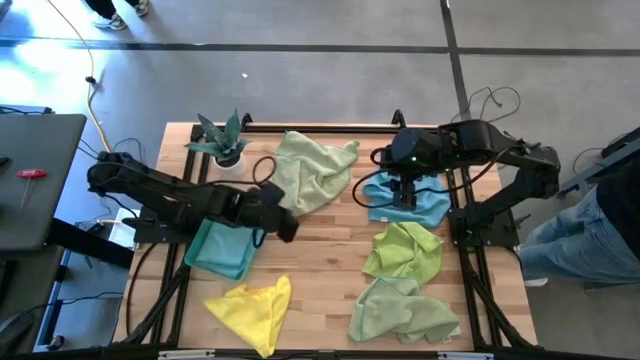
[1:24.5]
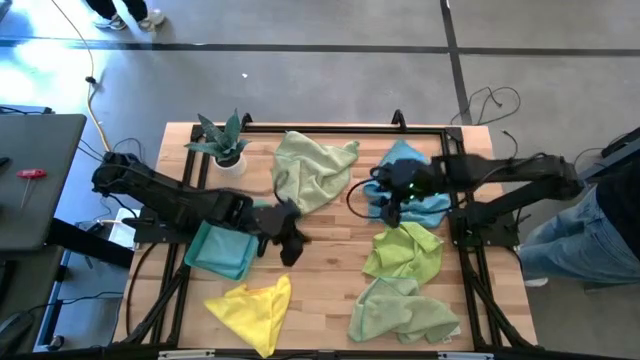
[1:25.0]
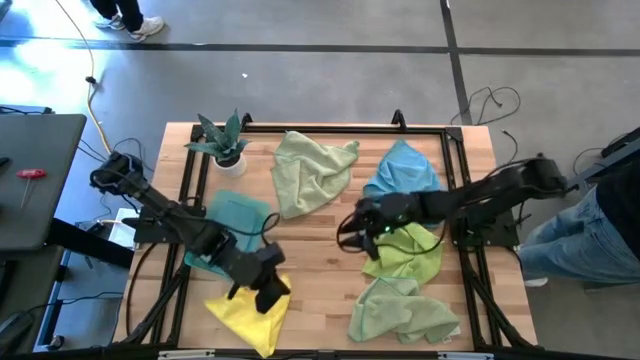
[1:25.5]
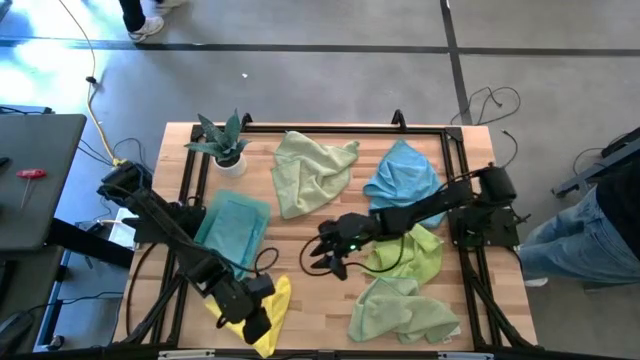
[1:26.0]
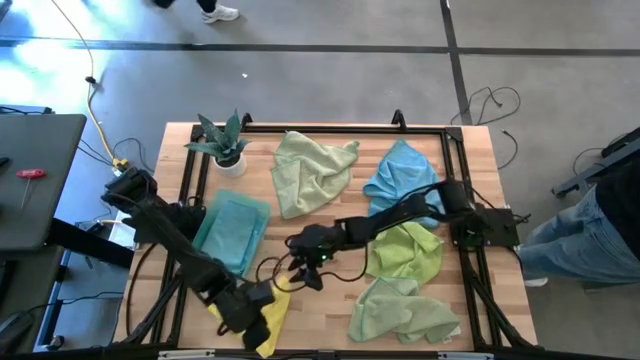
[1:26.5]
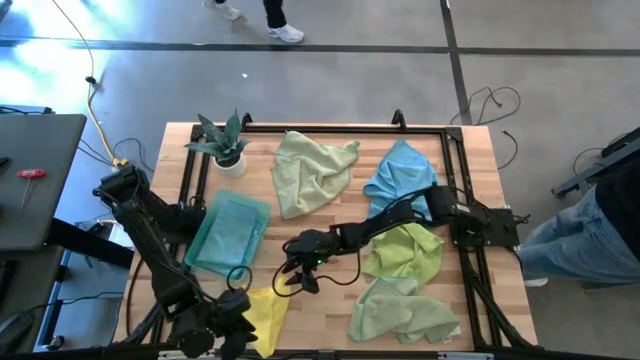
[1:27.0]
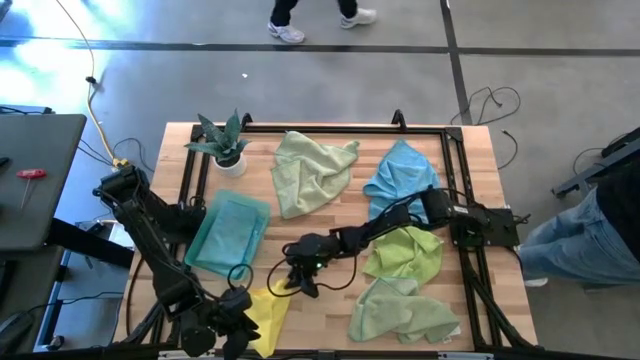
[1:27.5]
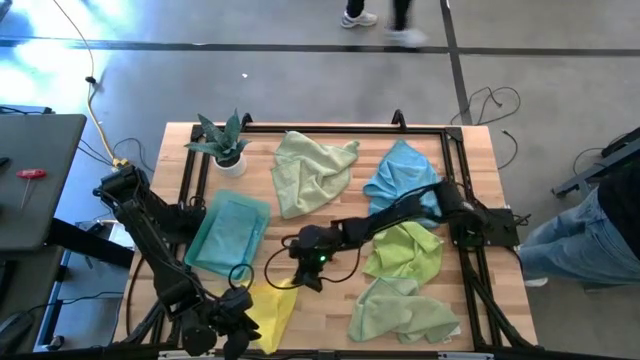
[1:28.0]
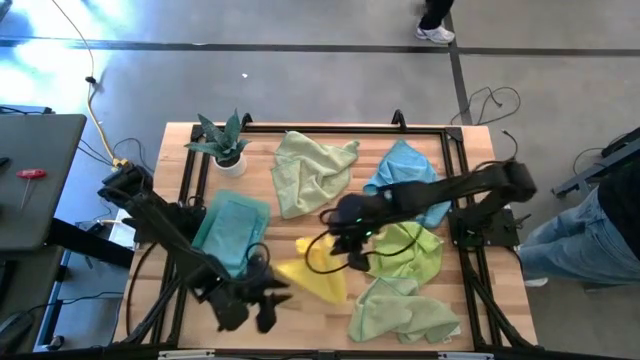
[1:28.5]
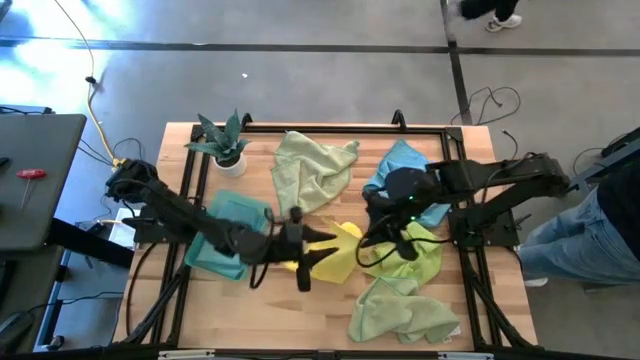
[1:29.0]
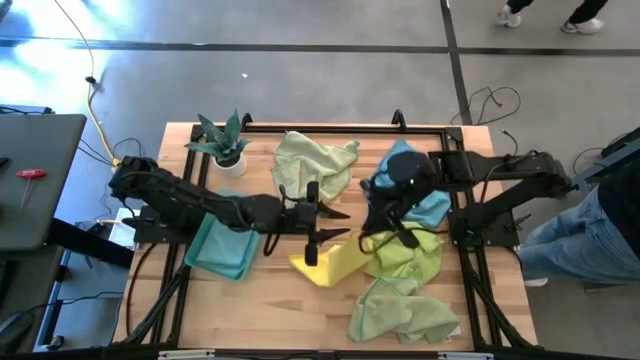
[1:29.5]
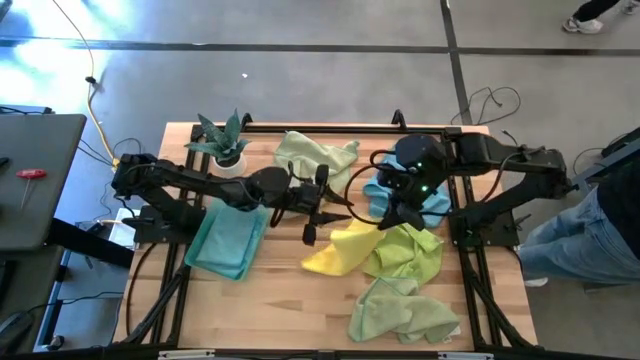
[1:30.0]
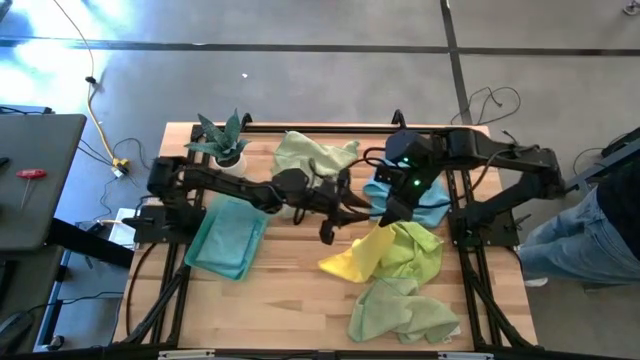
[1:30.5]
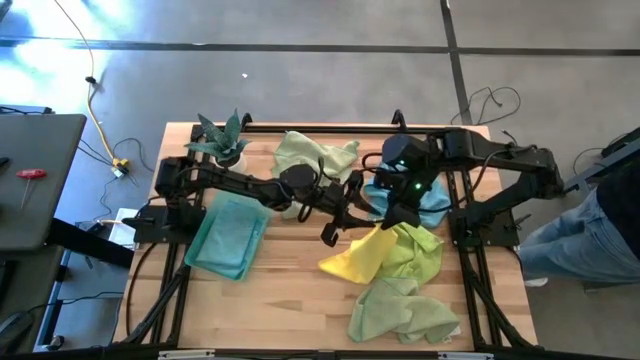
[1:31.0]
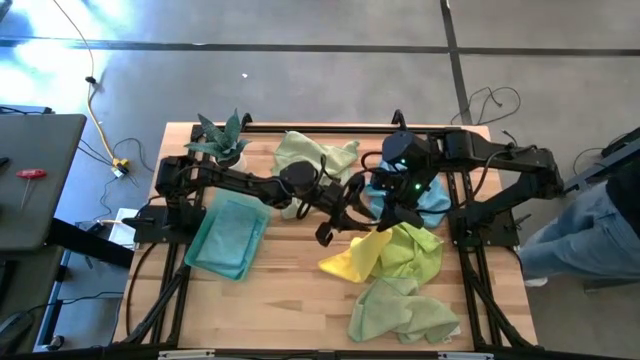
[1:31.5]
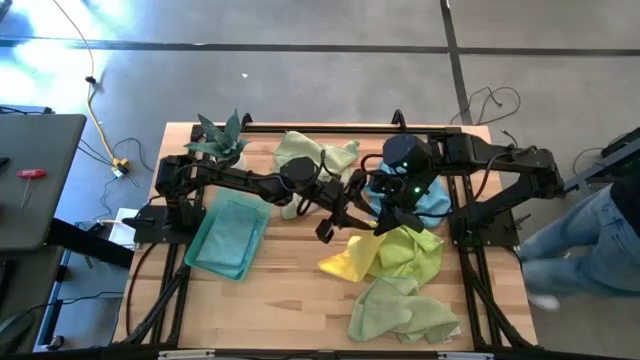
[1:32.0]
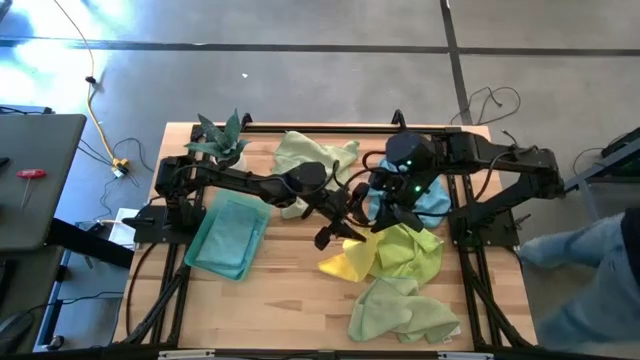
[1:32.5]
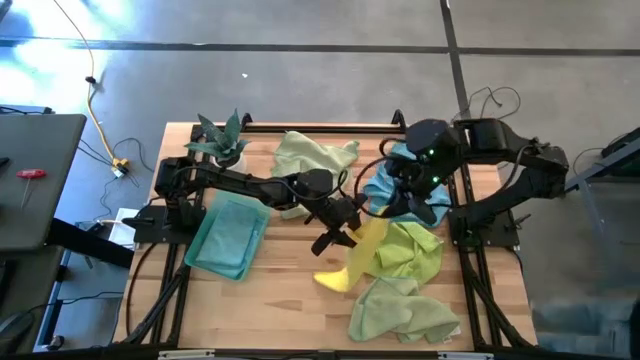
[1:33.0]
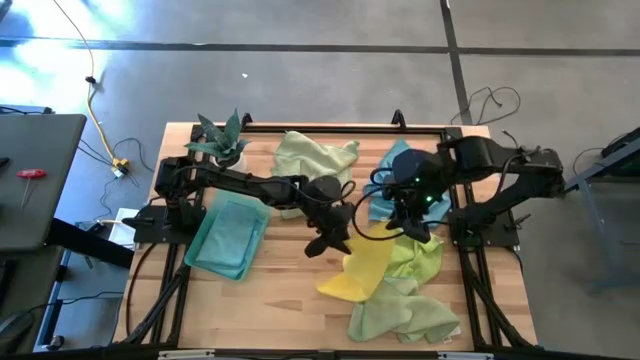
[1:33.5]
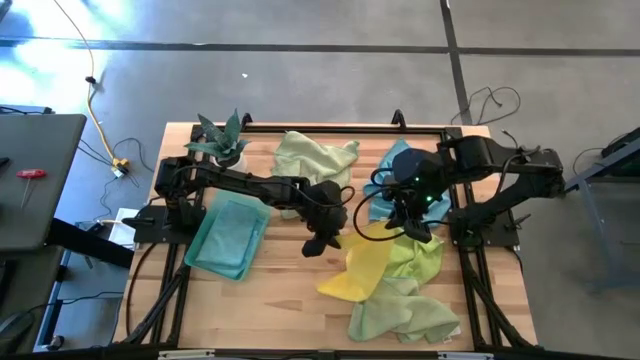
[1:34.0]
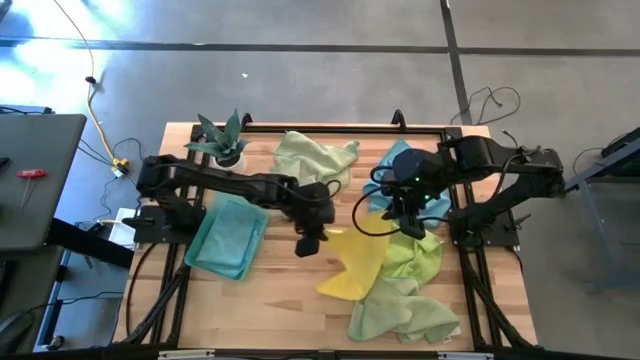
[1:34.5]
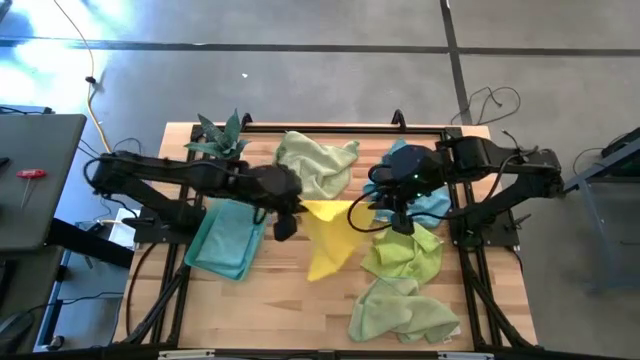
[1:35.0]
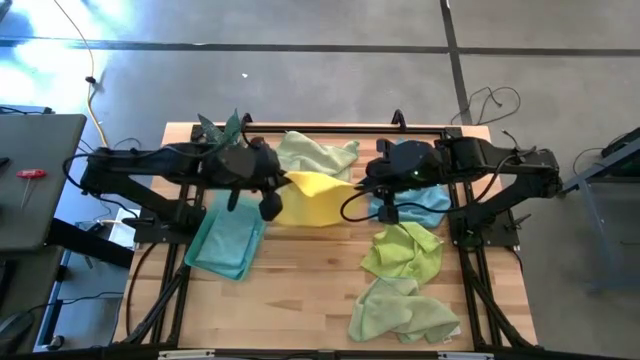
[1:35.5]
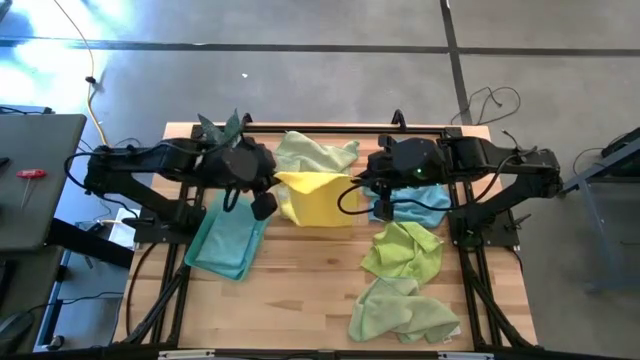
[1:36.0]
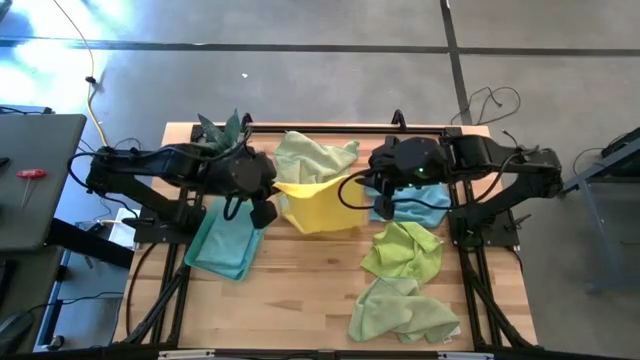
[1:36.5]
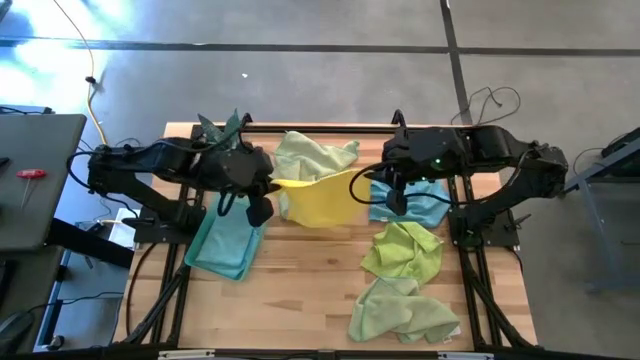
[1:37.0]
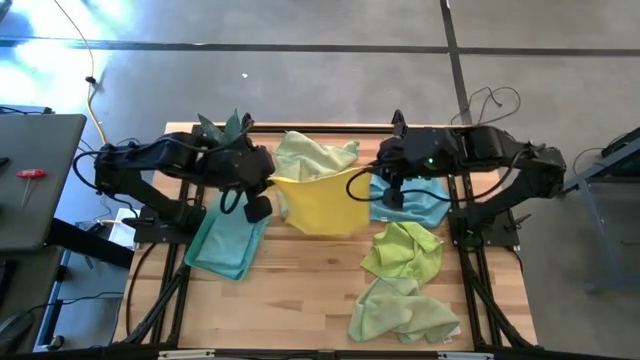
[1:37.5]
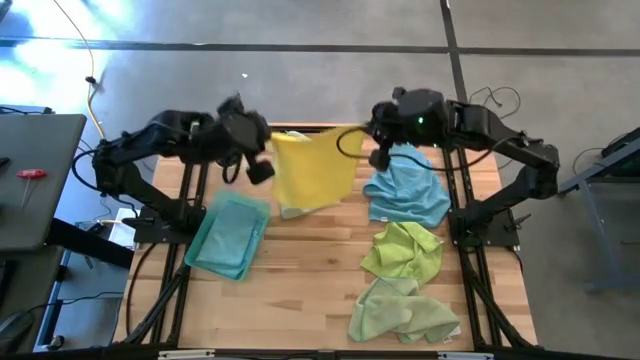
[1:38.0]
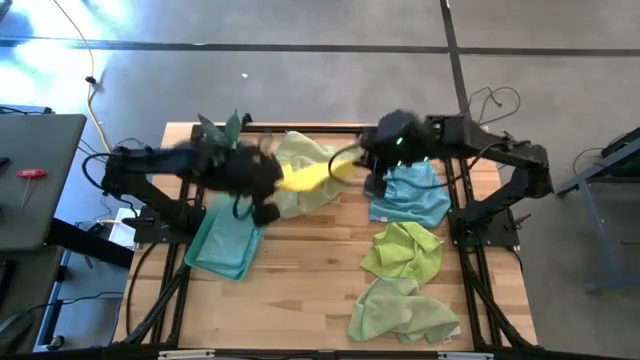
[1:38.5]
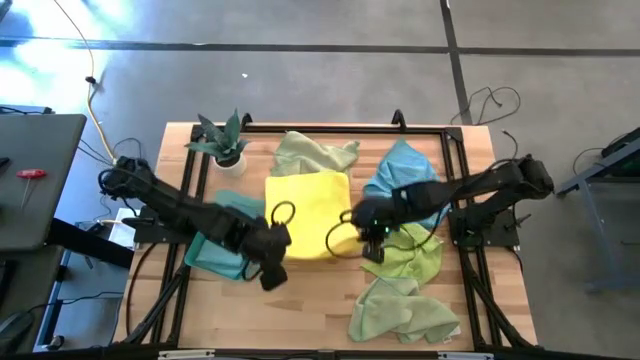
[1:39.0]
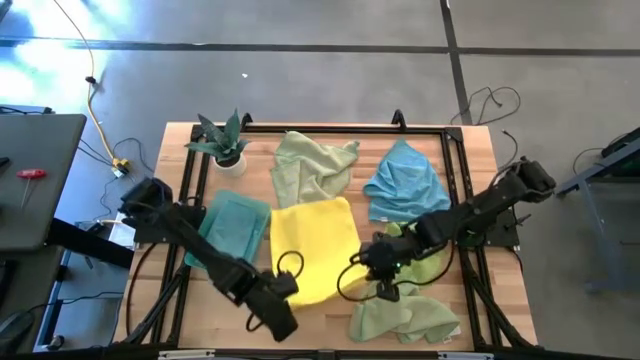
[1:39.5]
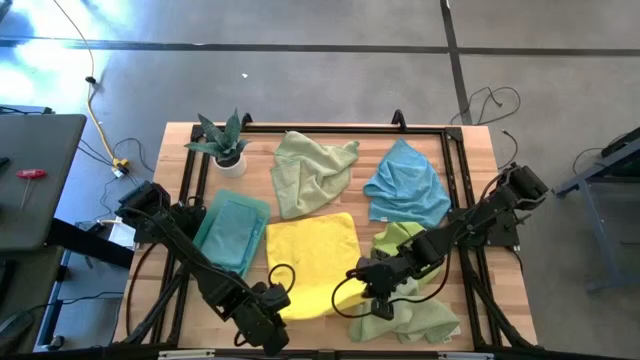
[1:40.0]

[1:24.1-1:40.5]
Task: Fold microfiber towels
Fold the yellow microfiber towel

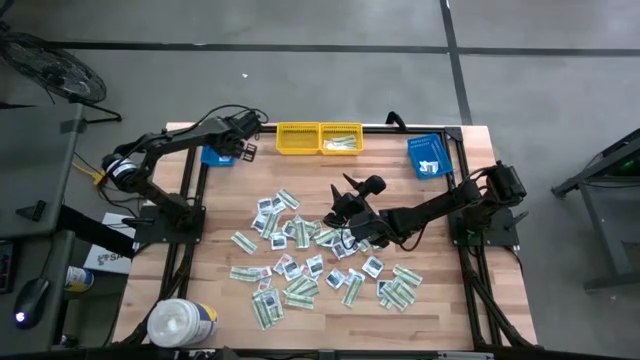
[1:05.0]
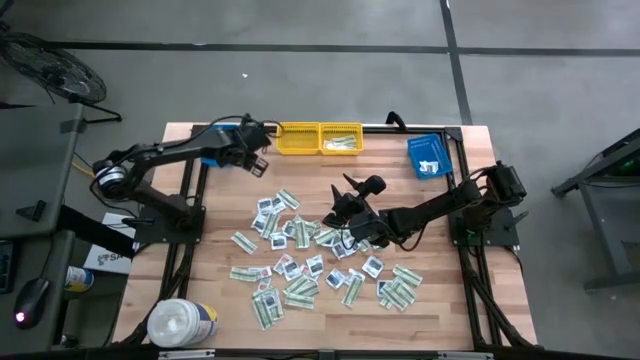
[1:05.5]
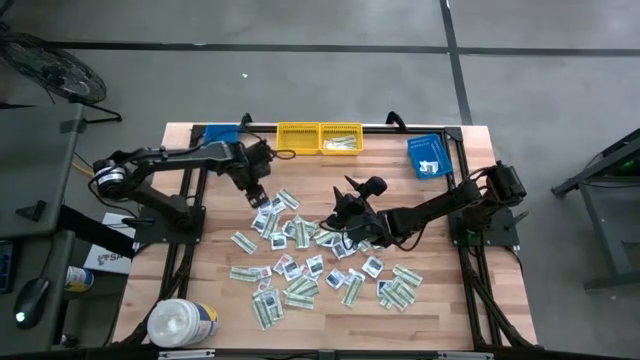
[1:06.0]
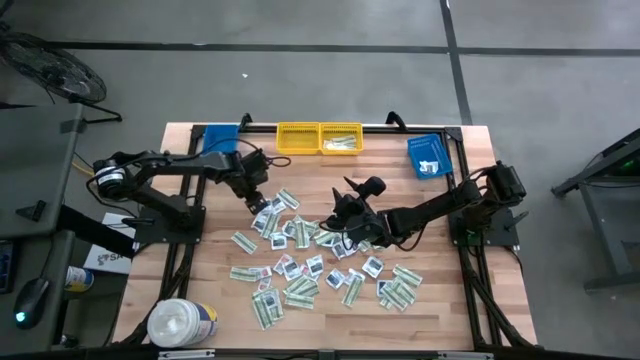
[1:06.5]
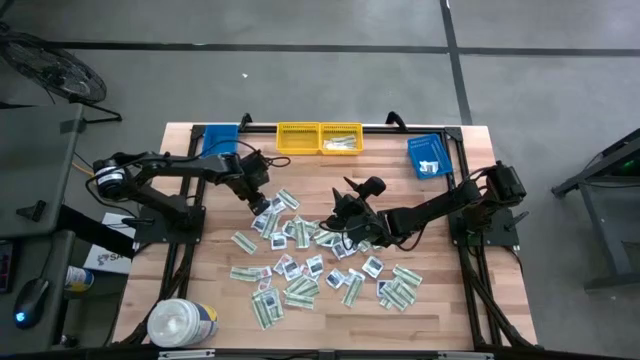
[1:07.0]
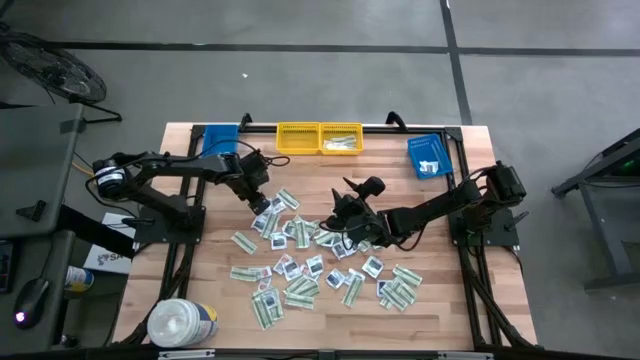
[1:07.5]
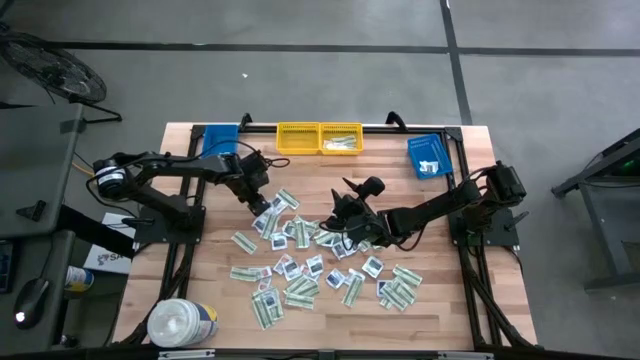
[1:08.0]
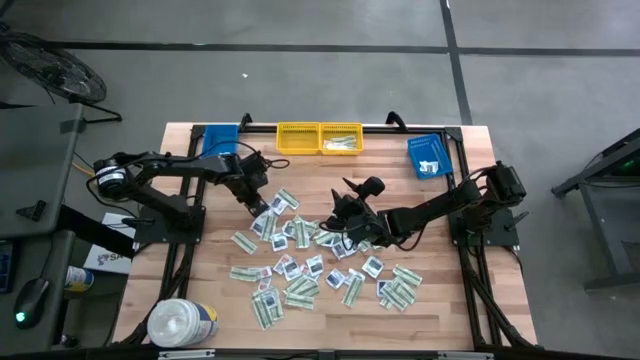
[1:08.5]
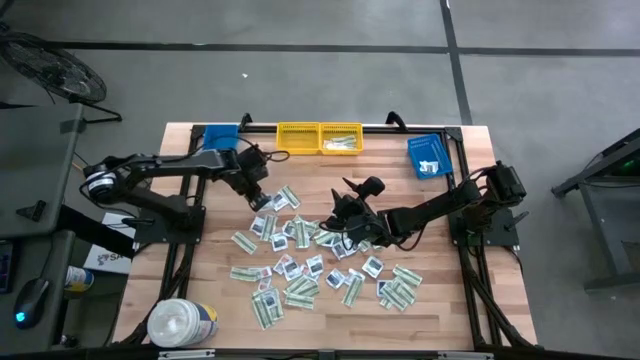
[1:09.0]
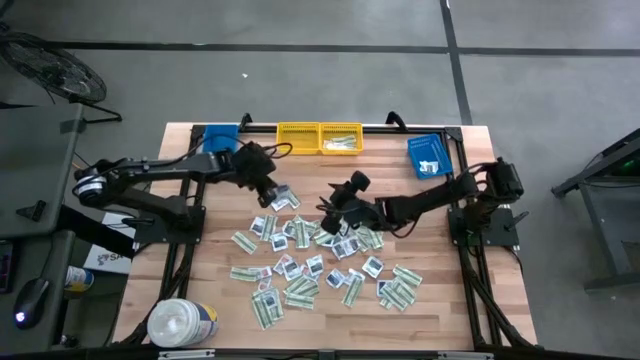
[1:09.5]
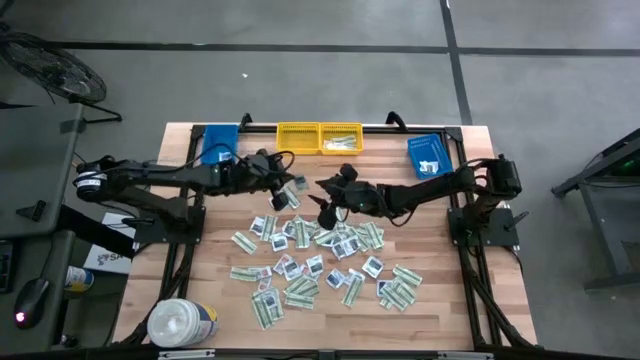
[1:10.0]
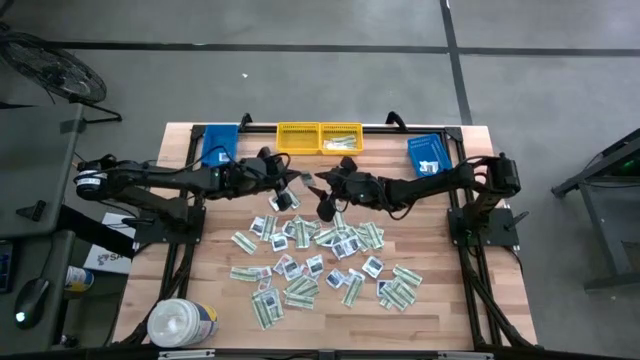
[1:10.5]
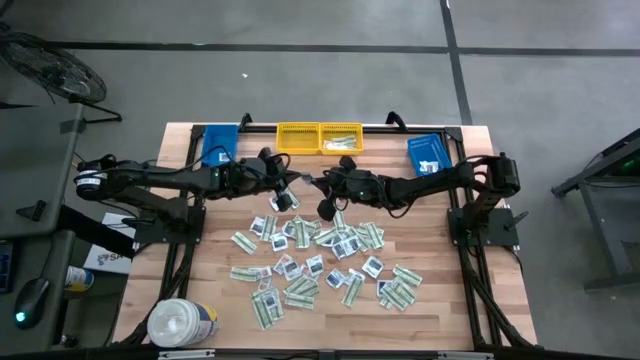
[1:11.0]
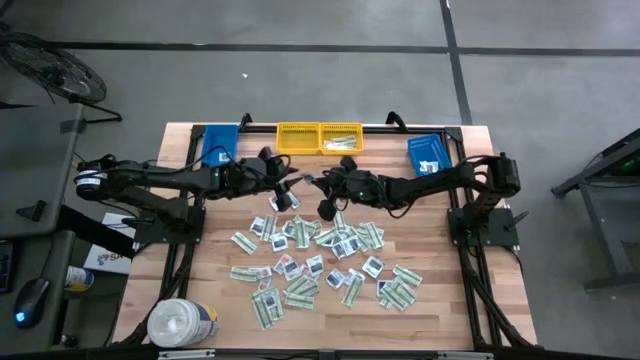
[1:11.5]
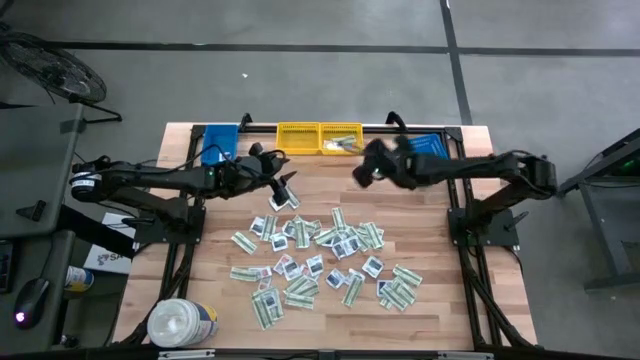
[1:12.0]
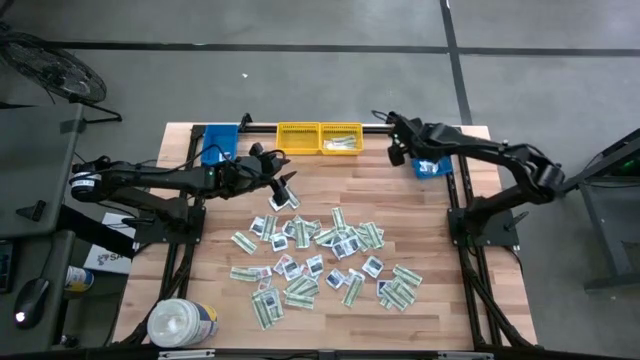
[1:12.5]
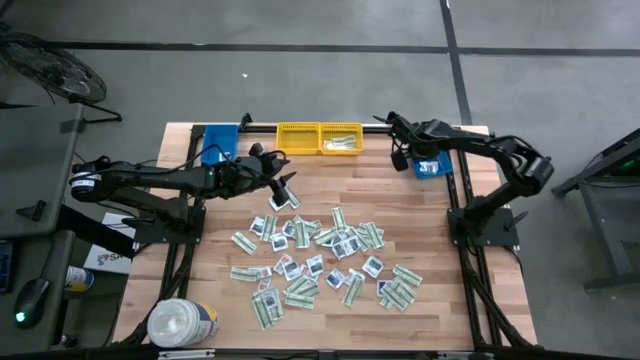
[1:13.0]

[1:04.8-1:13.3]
Task: Pick & Place First Aid Supplies
Put the black towelette pack into the right blue bin
